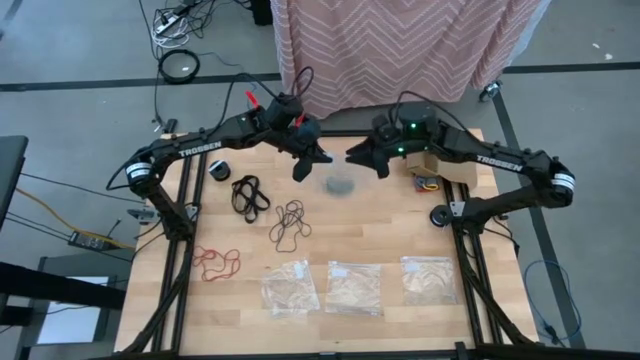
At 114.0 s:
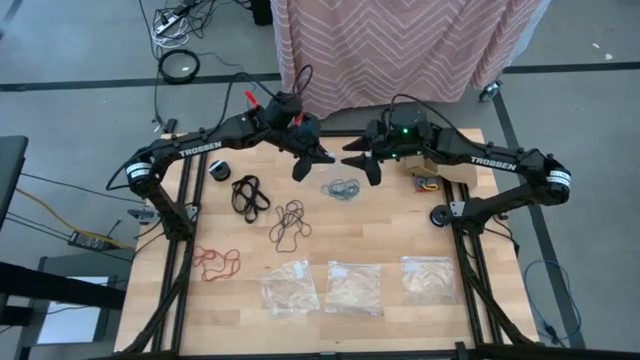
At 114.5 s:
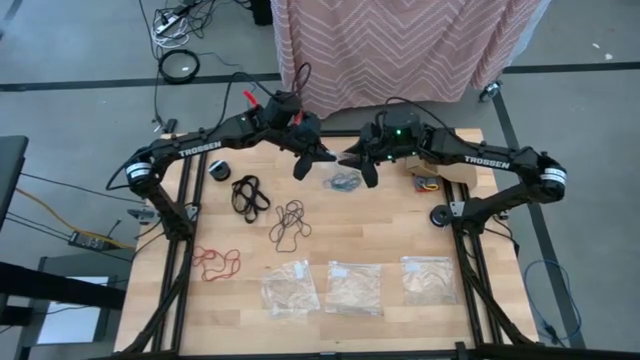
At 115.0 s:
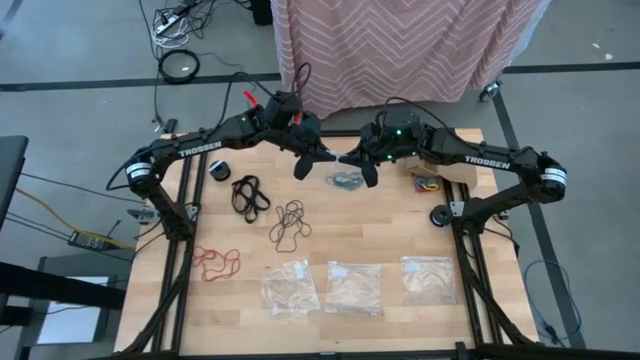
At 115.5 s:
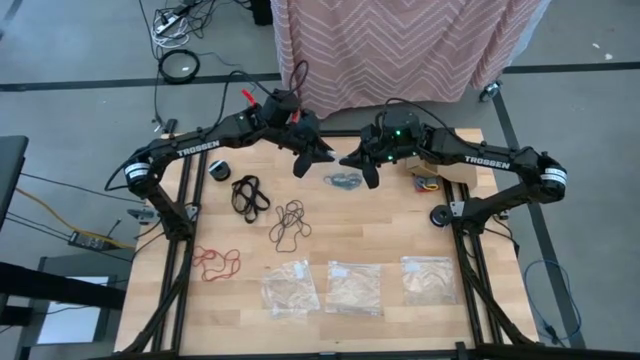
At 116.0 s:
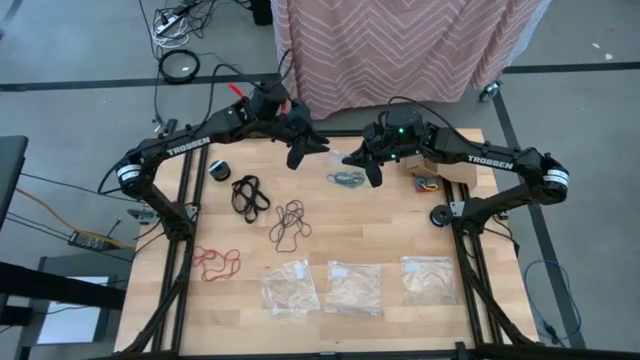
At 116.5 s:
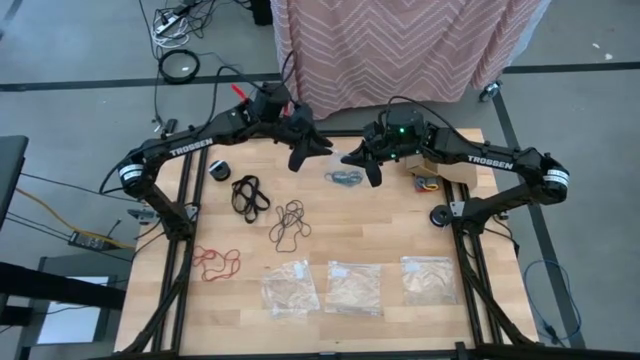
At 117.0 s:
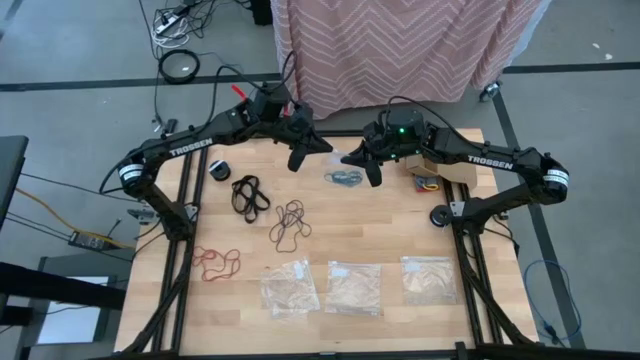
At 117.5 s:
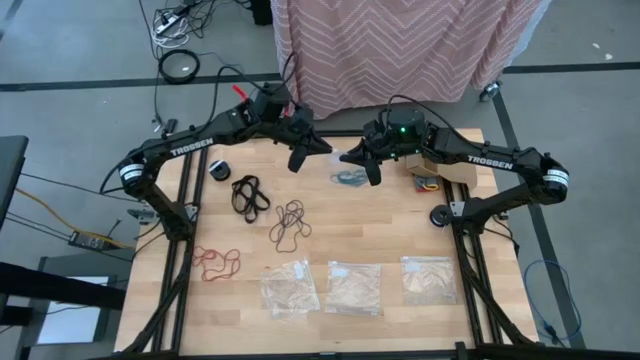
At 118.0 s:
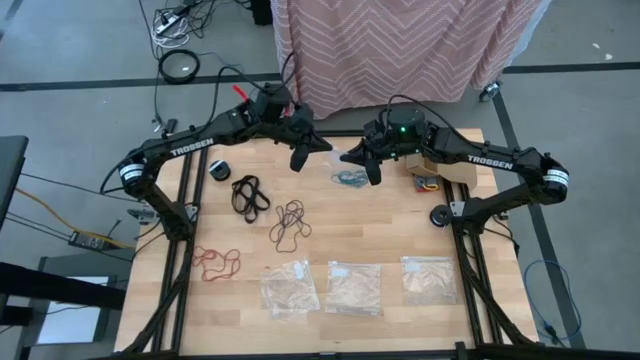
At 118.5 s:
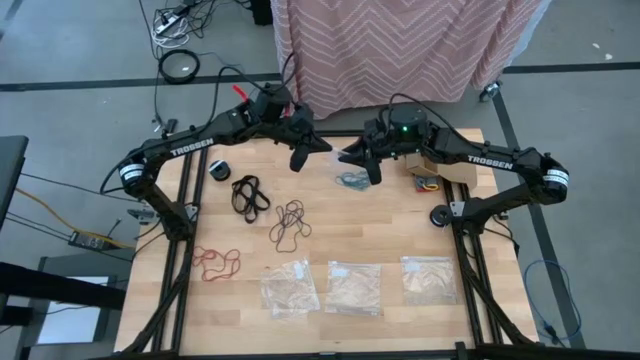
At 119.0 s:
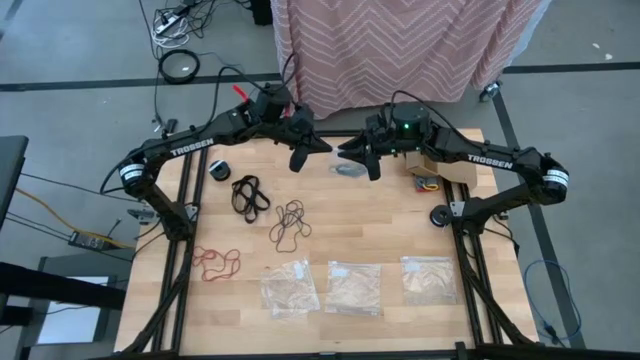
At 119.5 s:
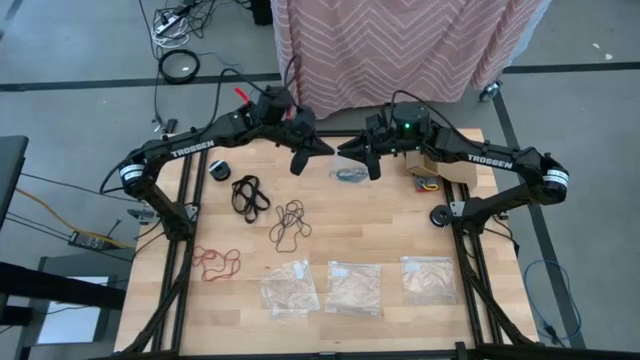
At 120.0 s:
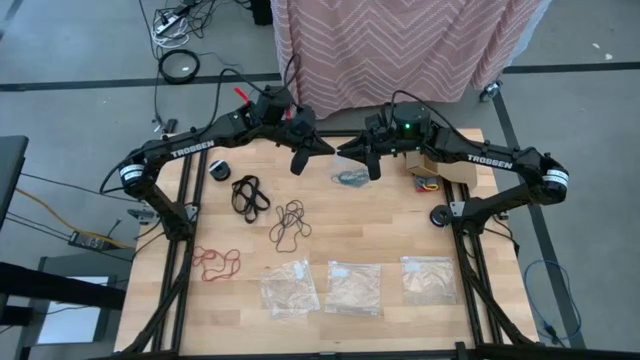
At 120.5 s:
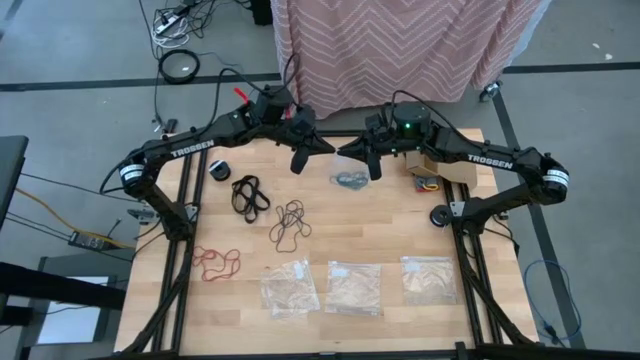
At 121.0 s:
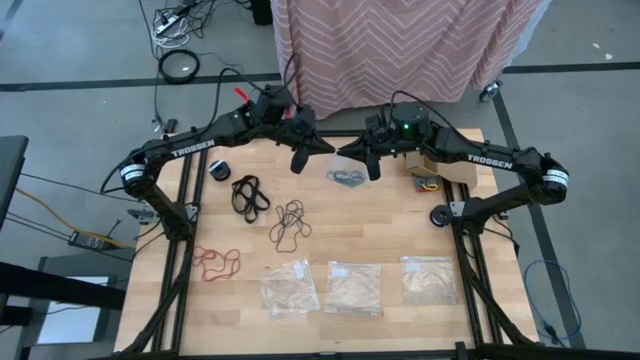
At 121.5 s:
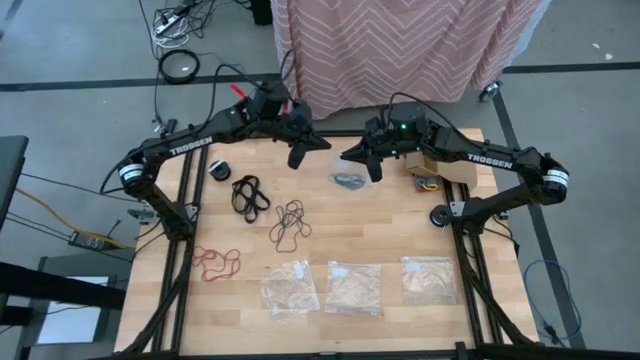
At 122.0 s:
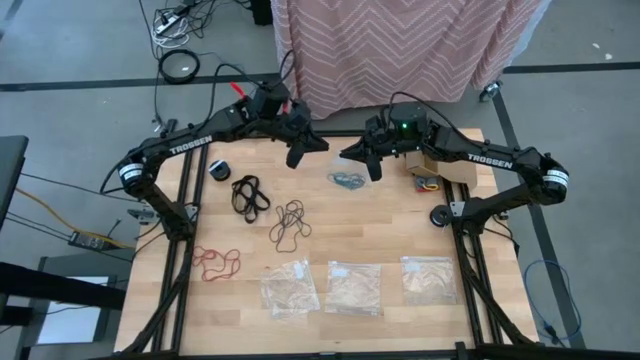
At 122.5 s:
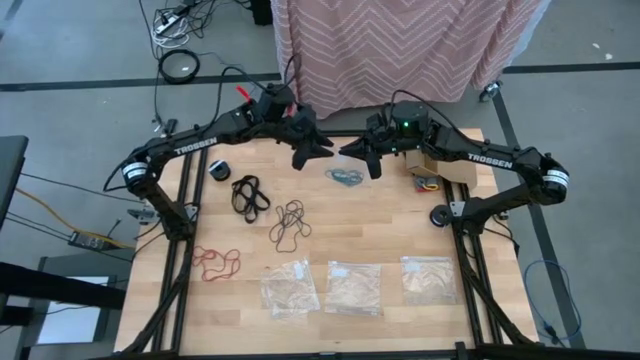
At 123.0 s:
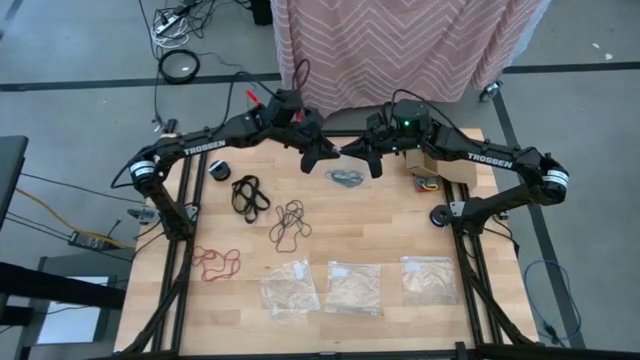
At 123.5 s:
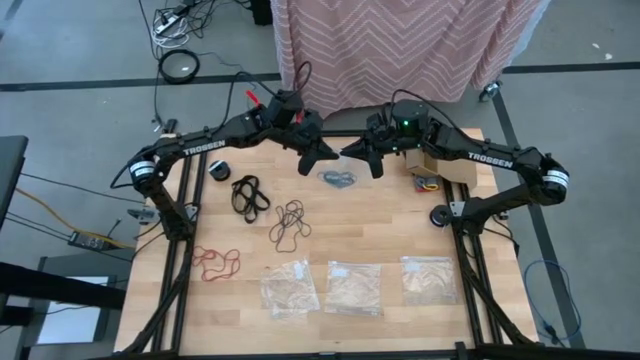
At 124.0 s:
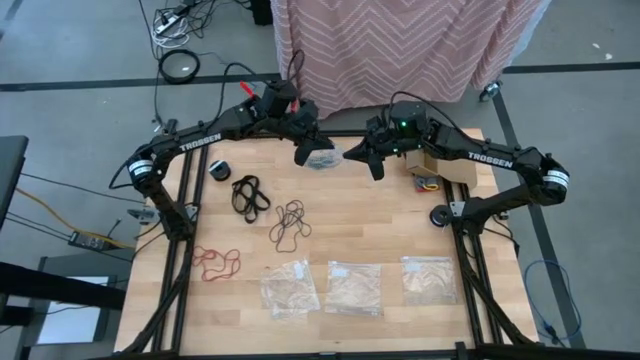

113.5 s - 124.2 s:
Task: Sort rubber bands
Close the top transparent zip bag

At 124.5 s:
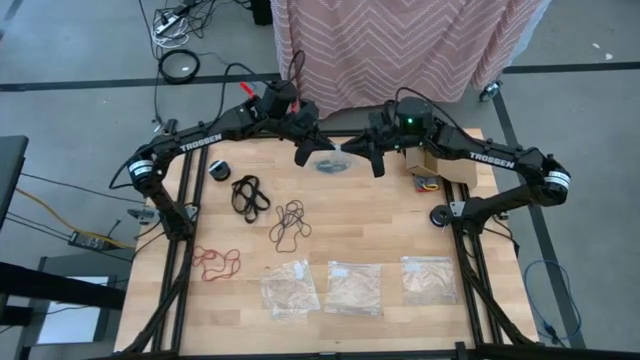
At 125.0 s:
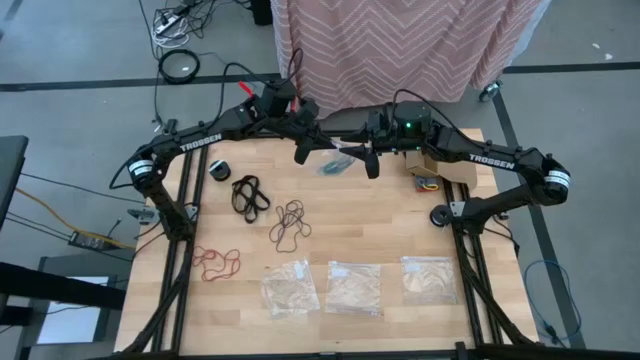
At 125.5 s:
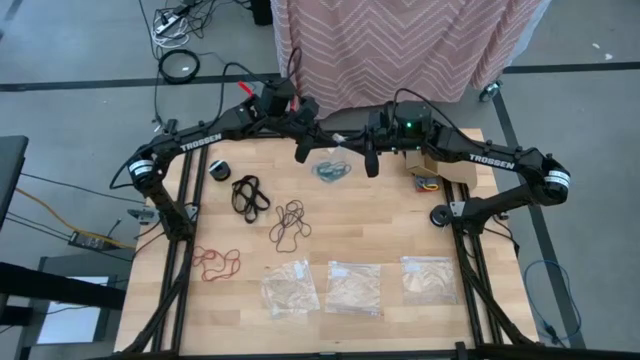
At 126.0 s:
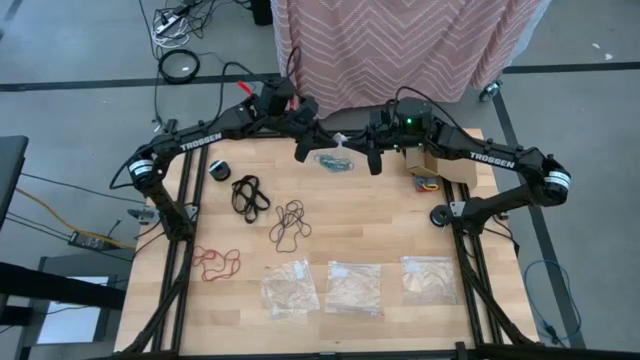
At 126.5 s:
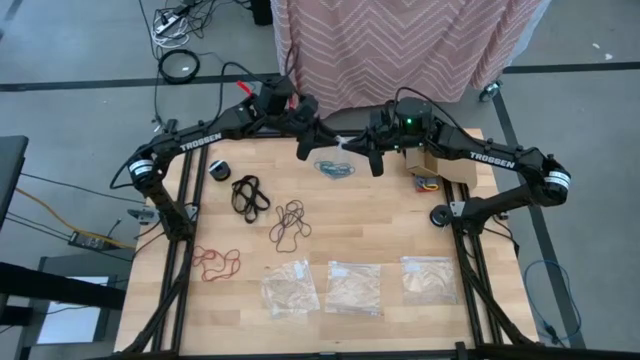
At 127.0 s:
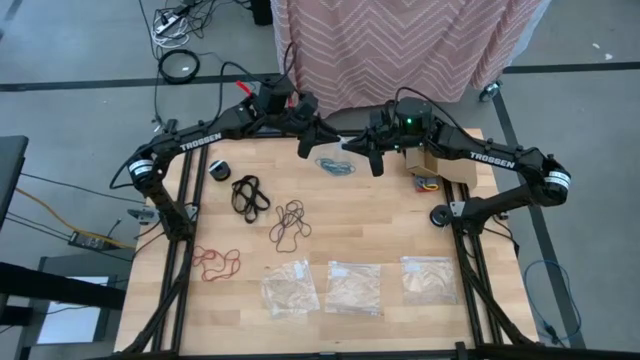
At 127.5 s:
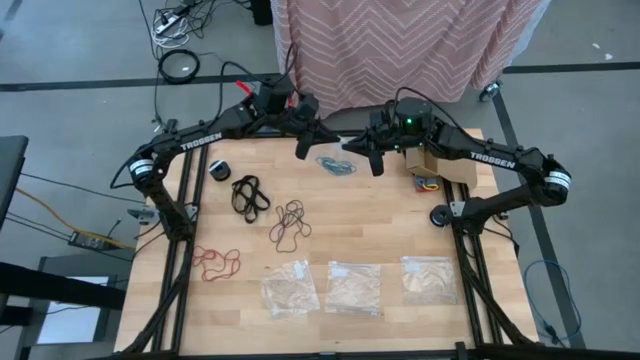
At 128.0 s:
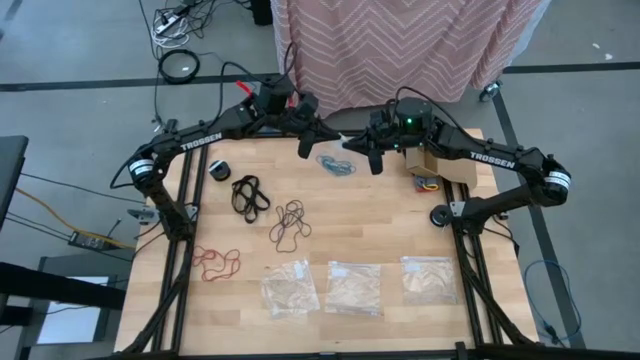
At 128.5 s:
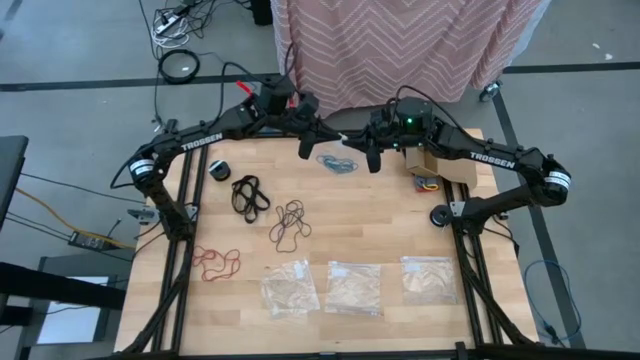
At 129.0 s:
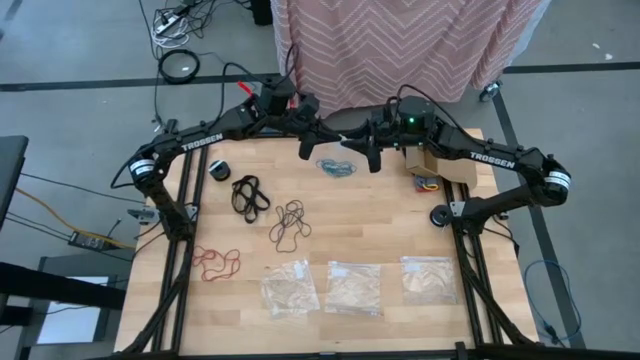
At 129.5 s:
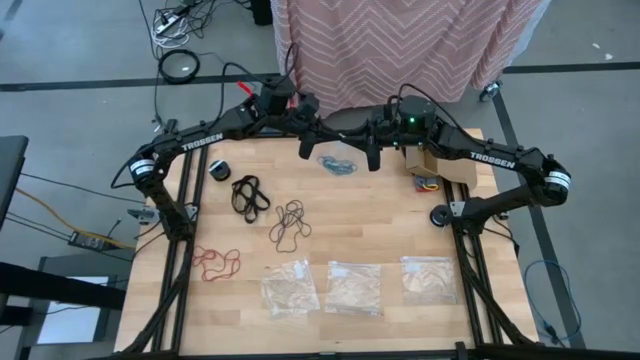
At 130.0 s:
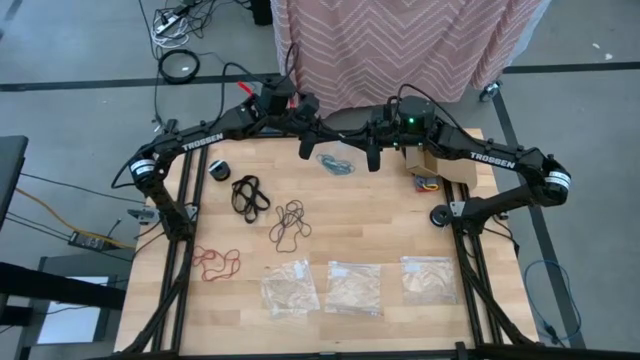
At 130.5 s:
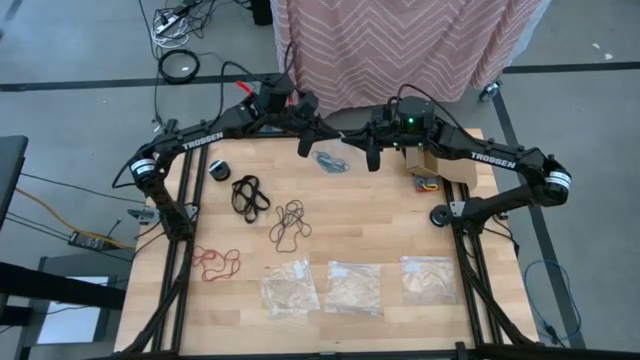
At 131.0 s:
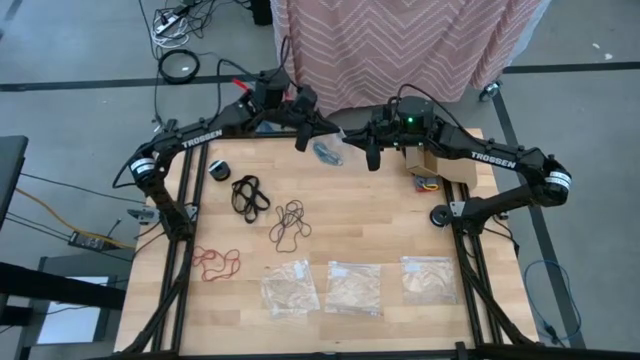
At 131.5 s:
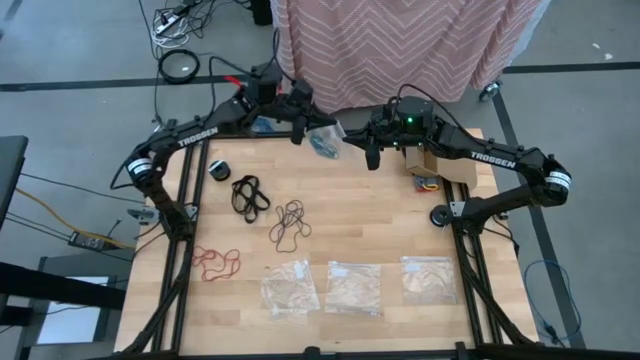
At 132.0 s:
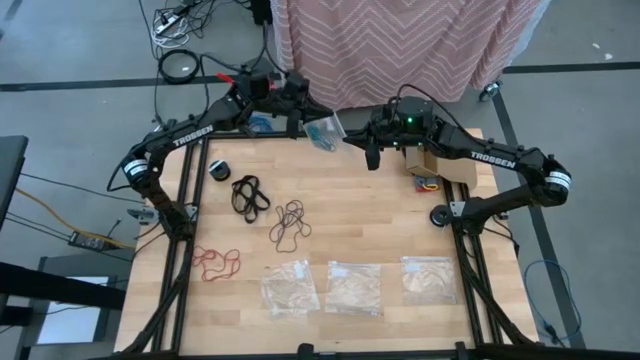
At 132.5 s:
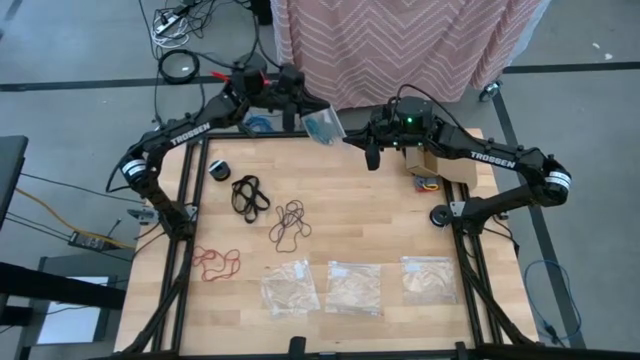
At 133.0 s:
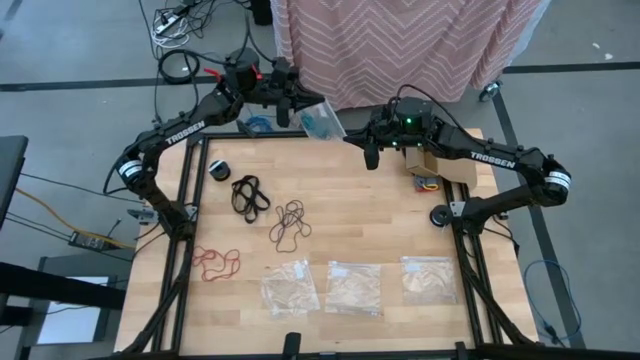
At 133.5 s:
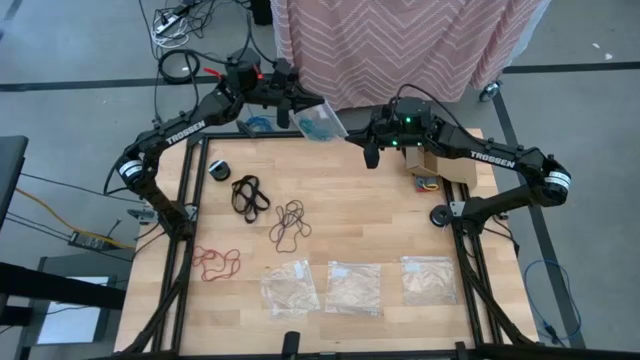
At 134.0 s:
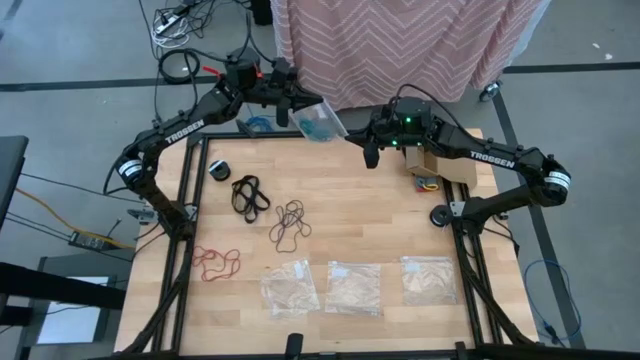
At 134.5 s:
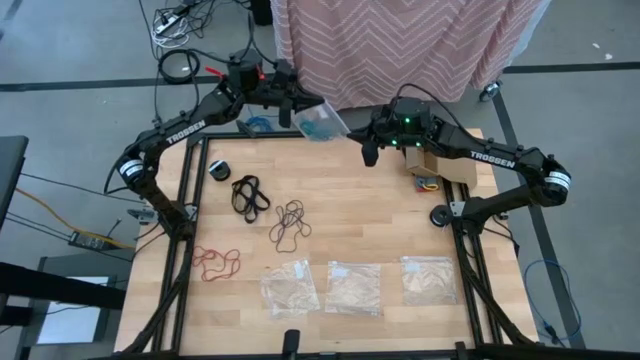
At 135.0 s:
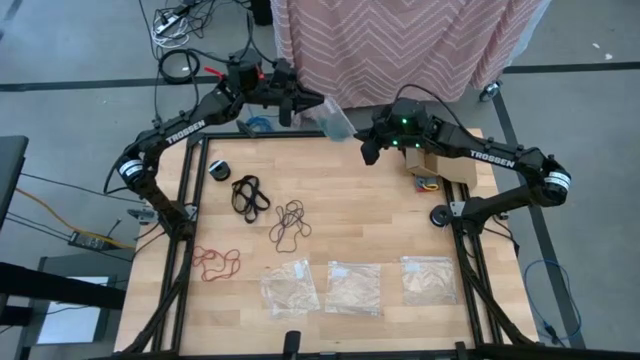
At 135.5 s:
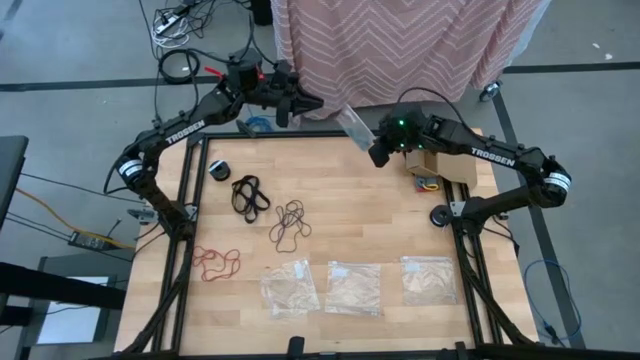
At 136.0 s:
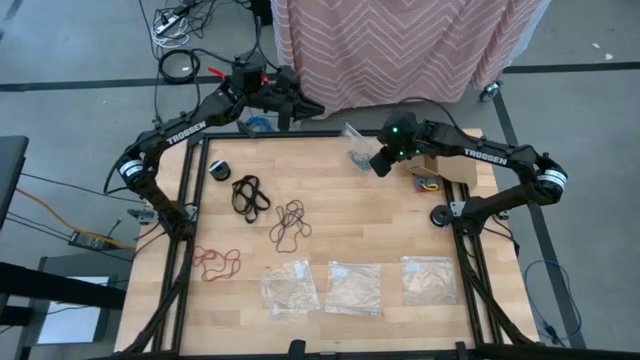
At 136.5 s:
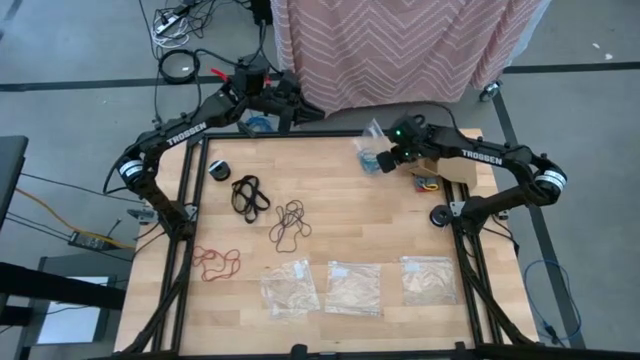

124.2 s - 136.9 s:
Close the top transparent zip bag
